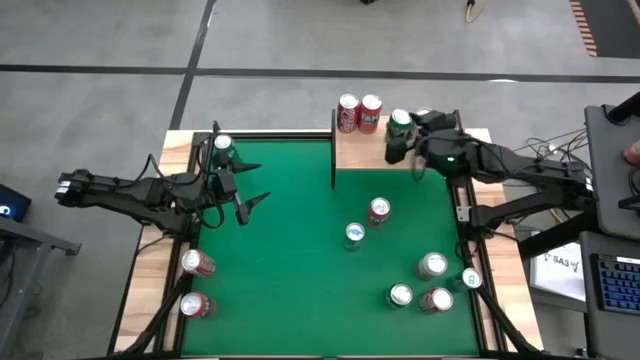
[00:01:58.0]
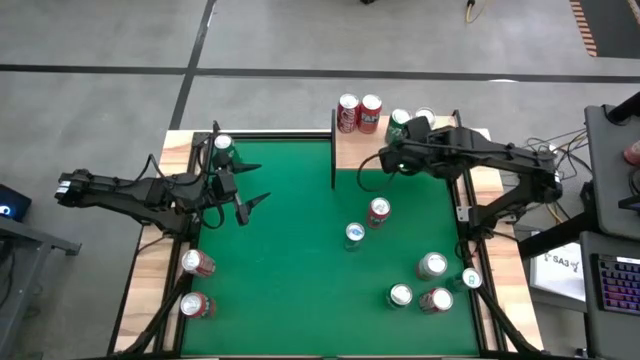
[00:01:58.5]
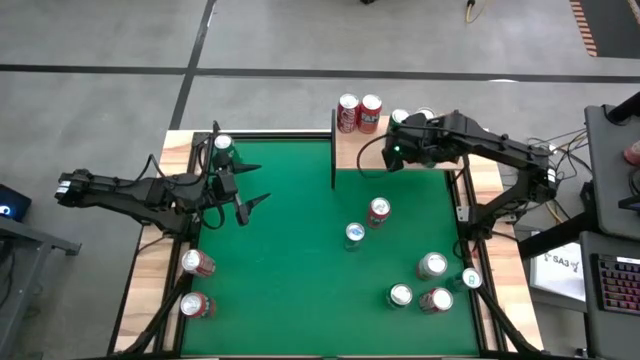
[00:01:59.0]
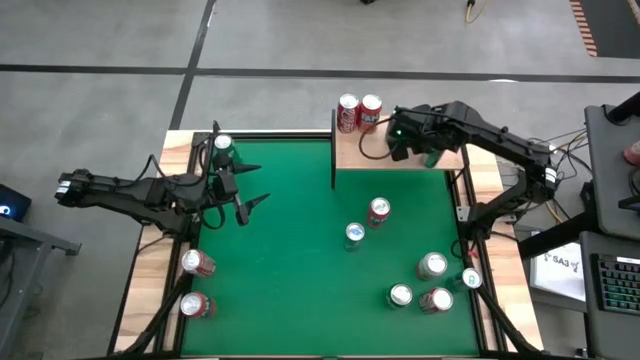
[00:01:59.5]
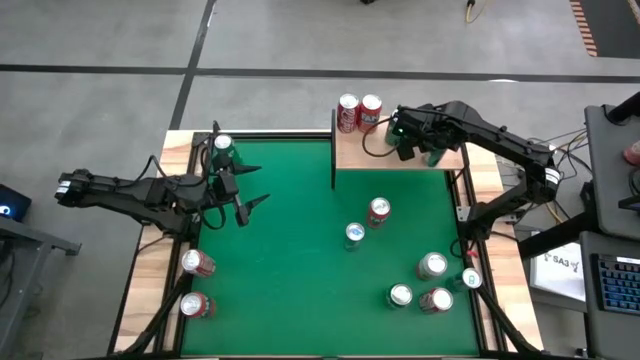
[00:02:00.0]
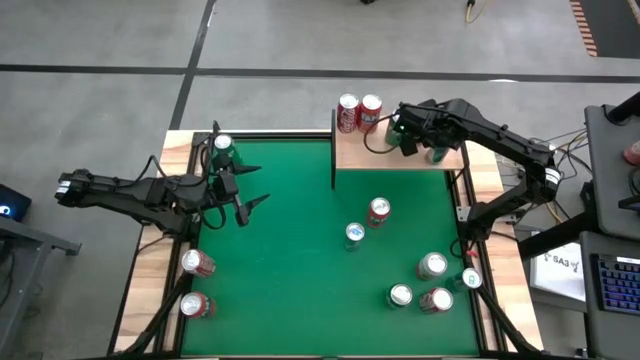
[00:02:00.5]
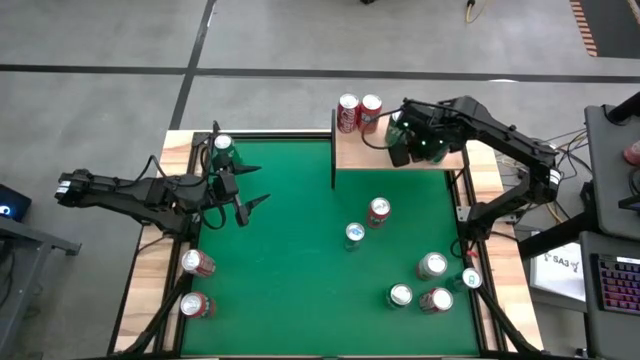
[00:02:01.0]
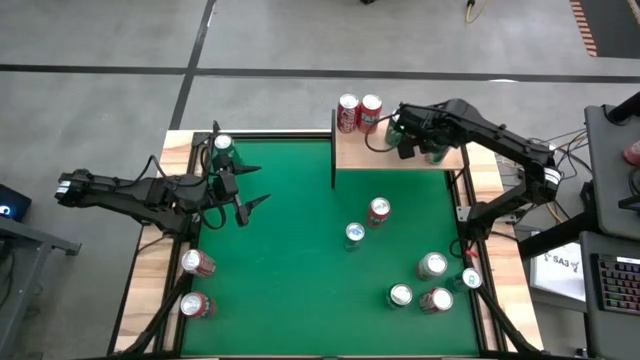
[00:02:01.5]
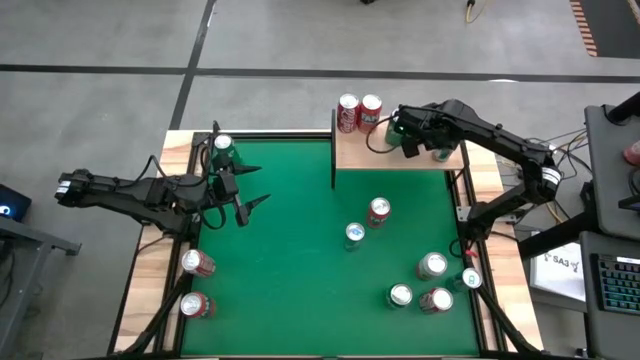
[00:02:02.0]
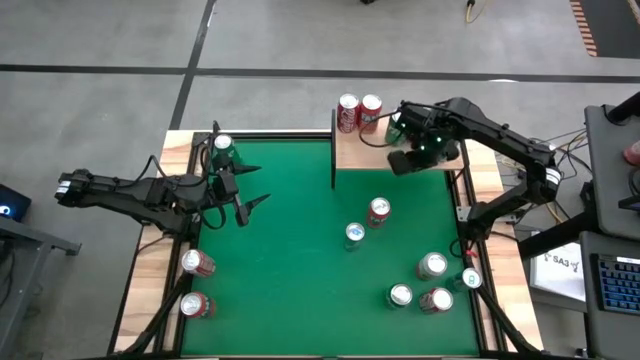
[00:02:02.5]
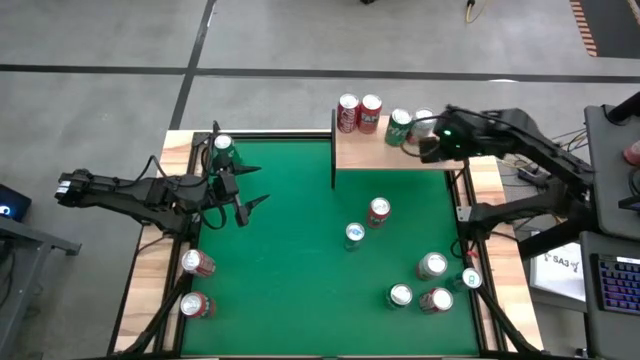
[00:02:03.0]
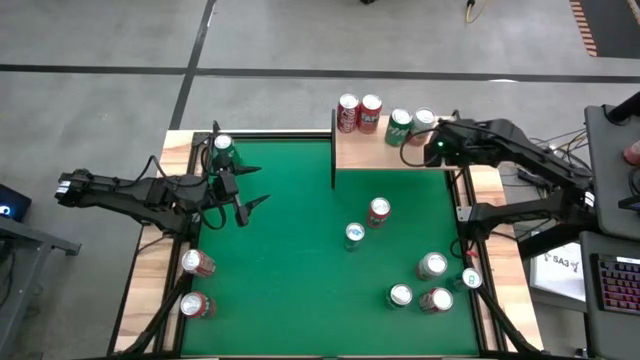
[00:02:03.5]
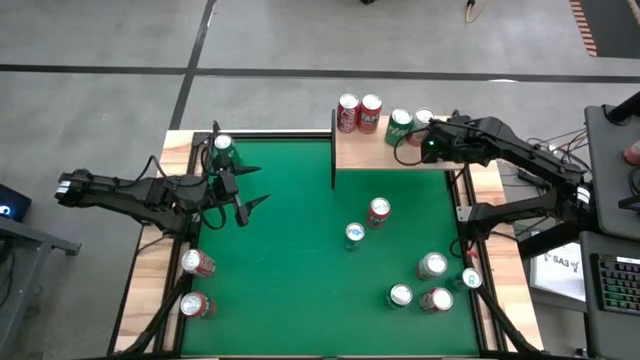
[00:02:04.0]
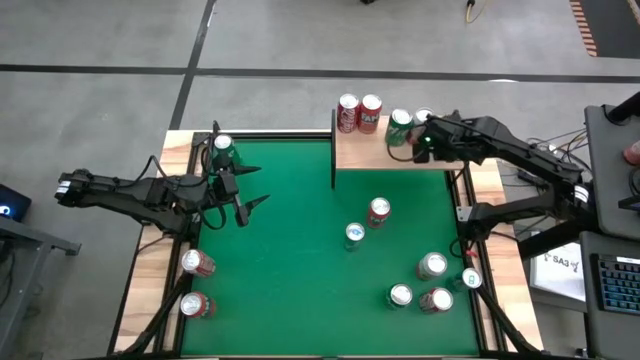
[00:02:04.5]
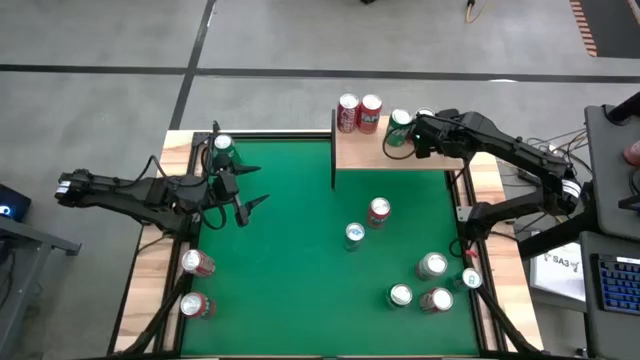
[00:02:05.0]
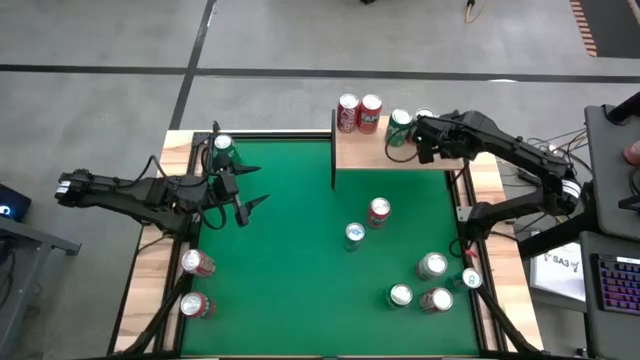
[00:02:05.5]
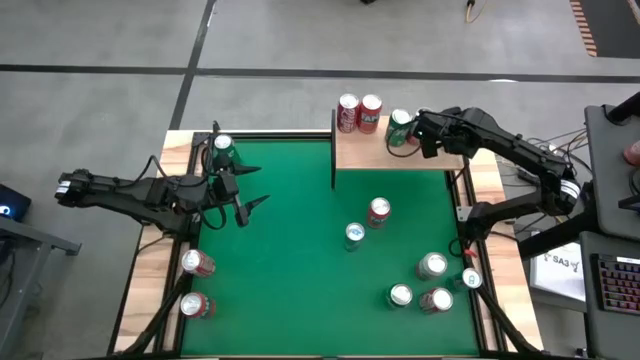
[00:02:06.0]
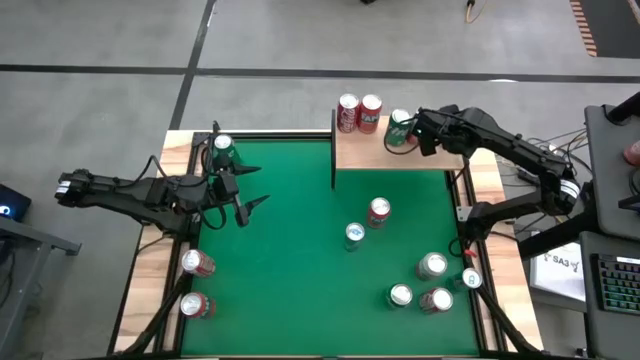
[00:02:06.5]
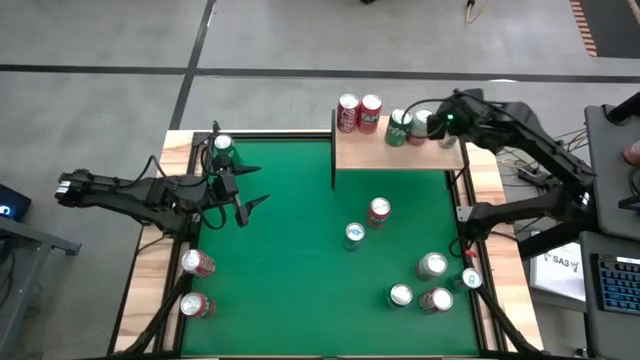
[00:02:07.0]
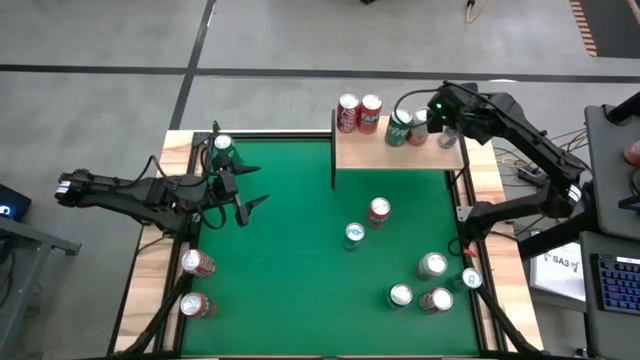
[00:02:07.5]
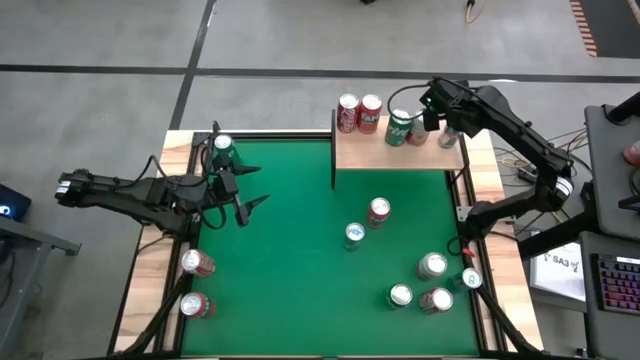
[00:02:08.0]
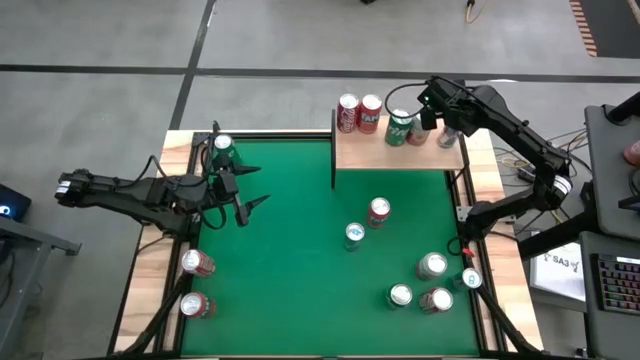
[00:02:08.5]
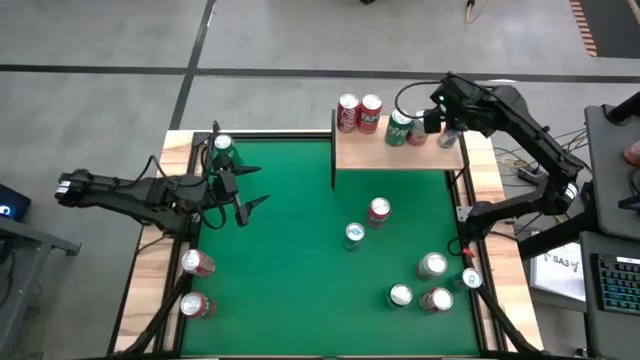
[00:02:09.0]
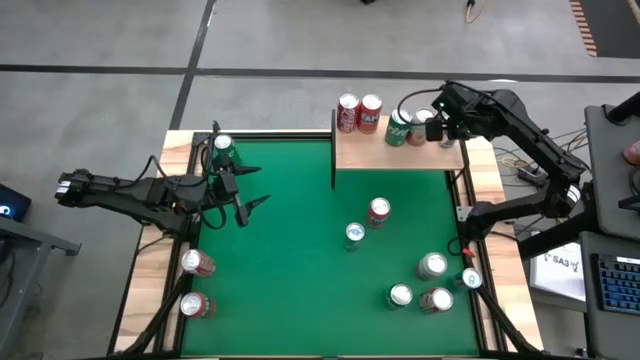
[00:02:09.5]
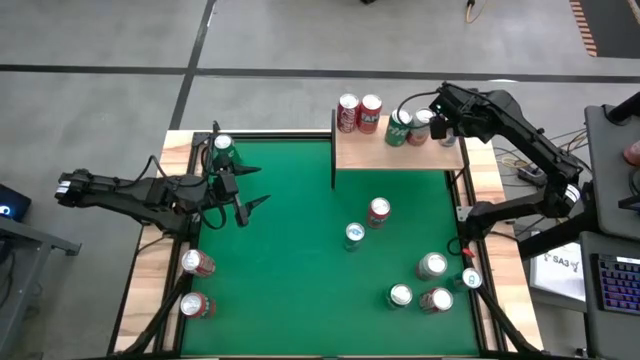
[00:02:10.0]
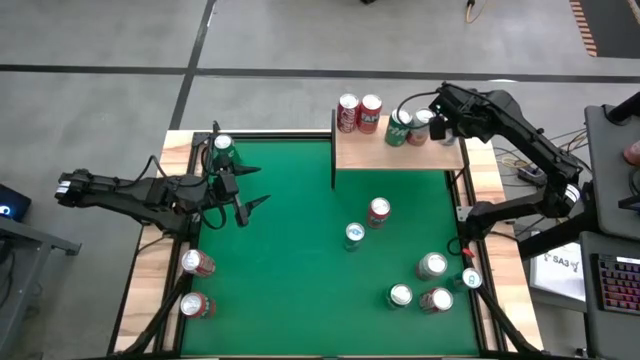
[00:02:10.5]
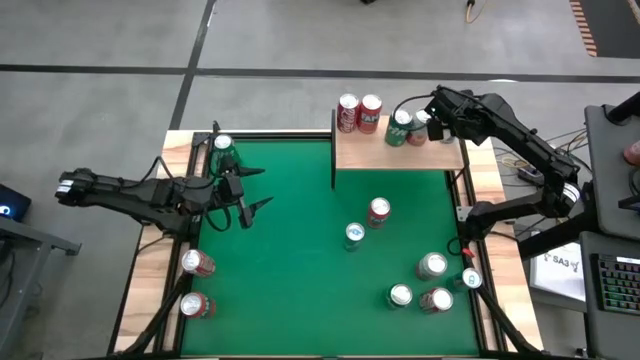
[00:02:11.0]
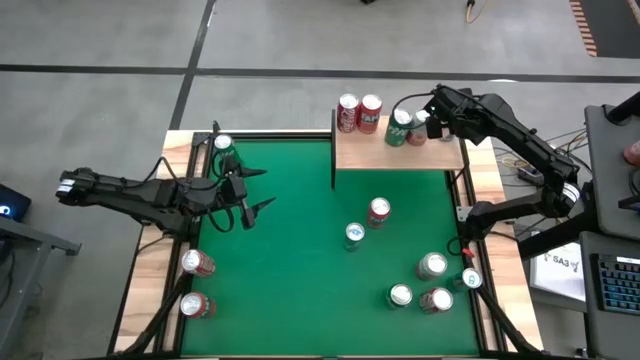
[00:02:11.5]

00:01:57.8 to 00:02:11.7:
Task: Place canned beverage on shelf
Put the top blue soda can on the shelf

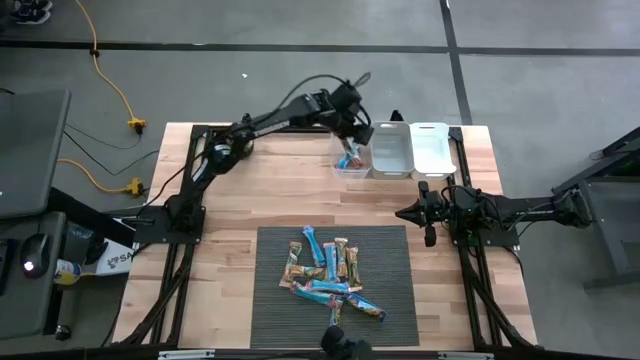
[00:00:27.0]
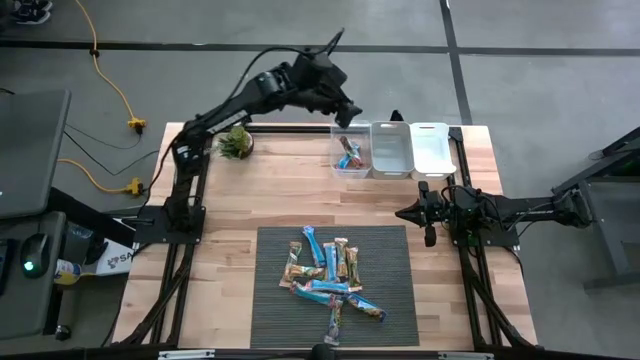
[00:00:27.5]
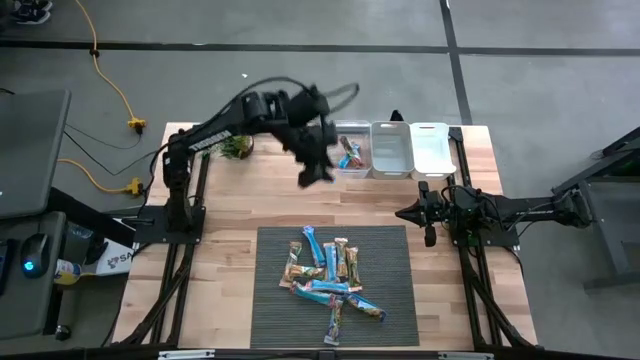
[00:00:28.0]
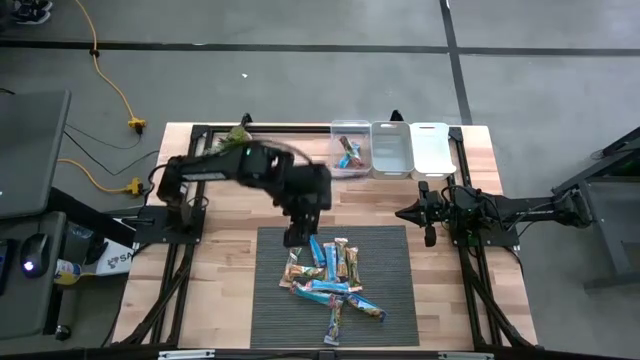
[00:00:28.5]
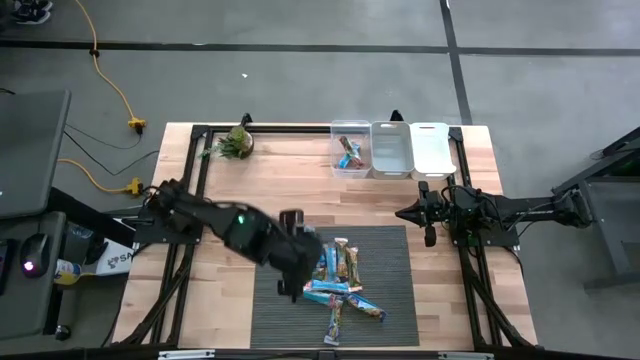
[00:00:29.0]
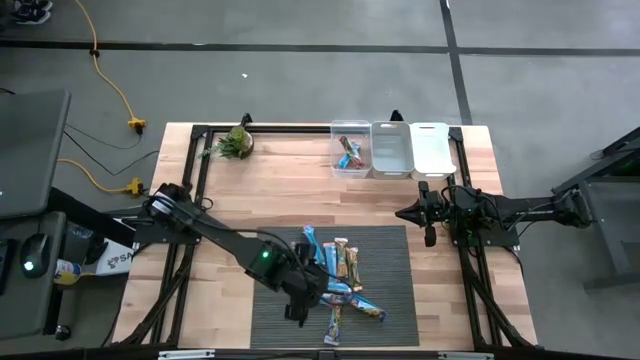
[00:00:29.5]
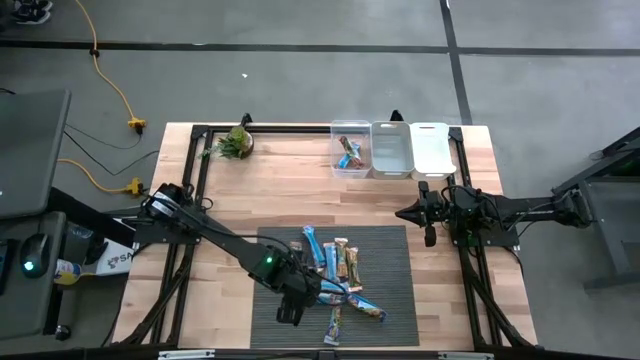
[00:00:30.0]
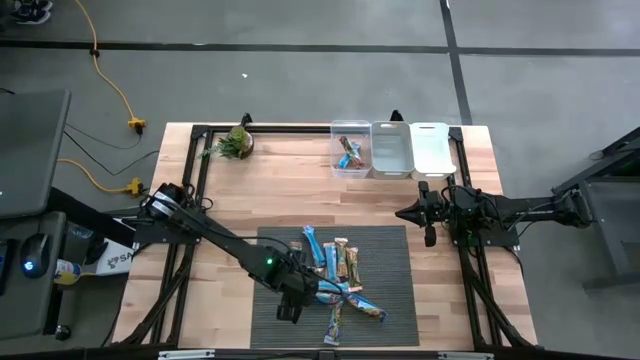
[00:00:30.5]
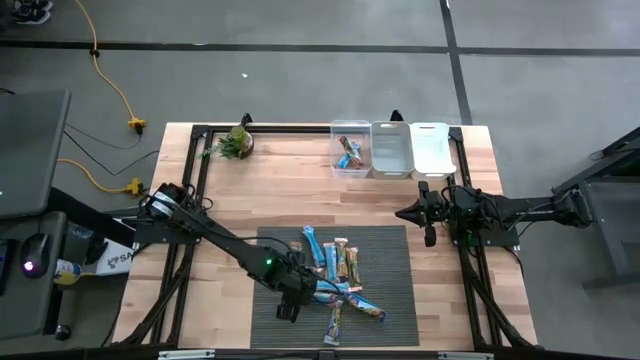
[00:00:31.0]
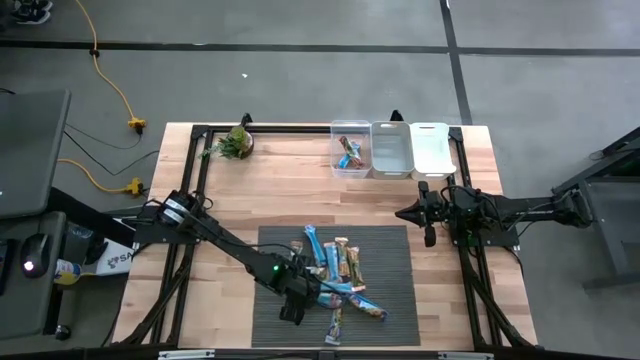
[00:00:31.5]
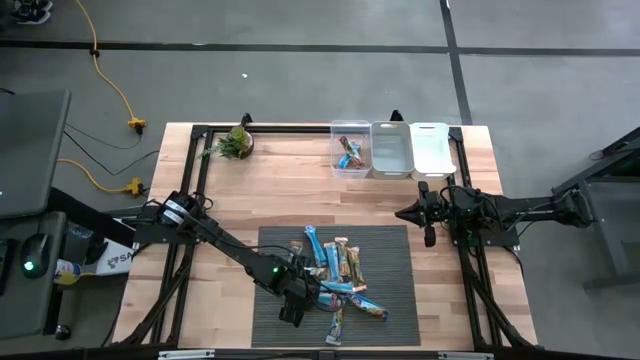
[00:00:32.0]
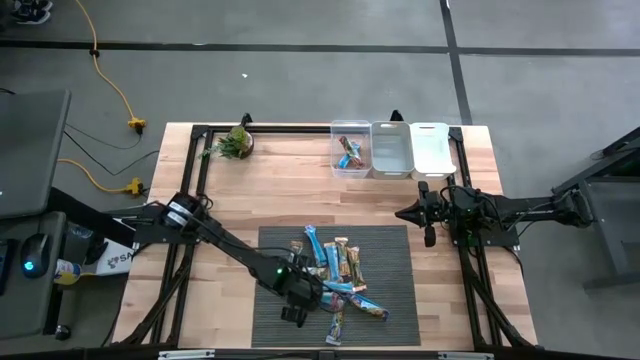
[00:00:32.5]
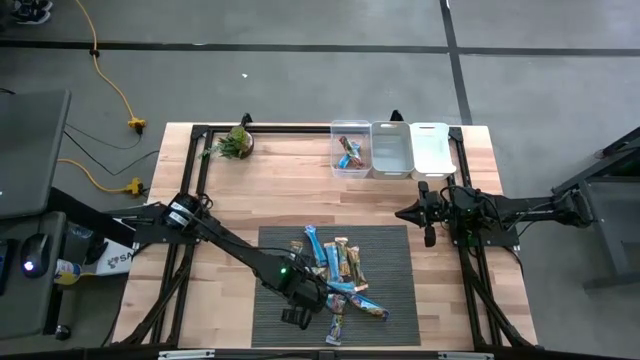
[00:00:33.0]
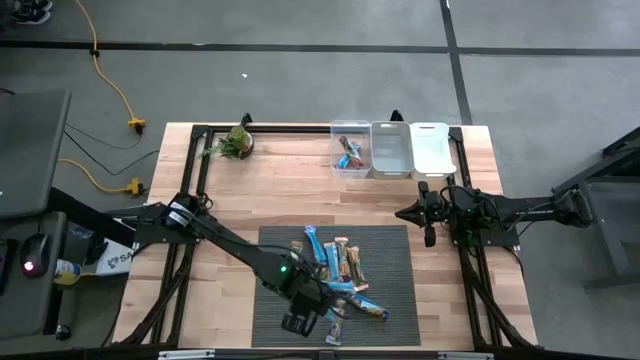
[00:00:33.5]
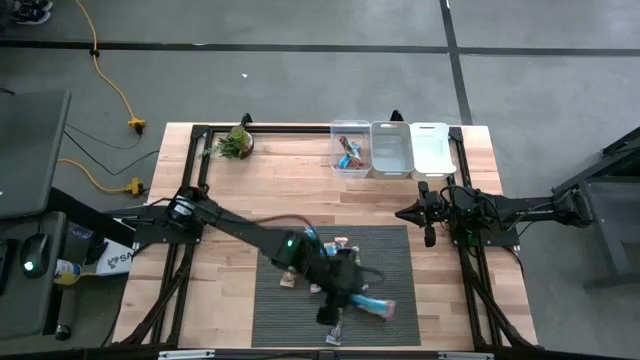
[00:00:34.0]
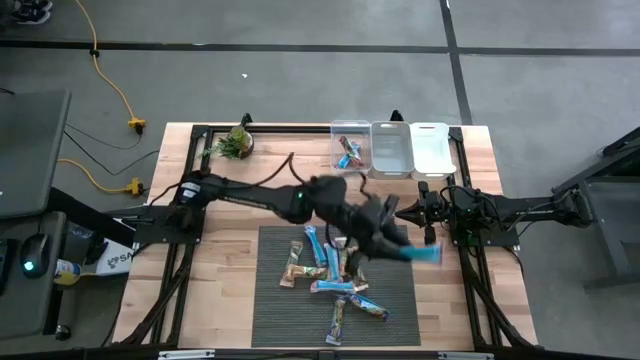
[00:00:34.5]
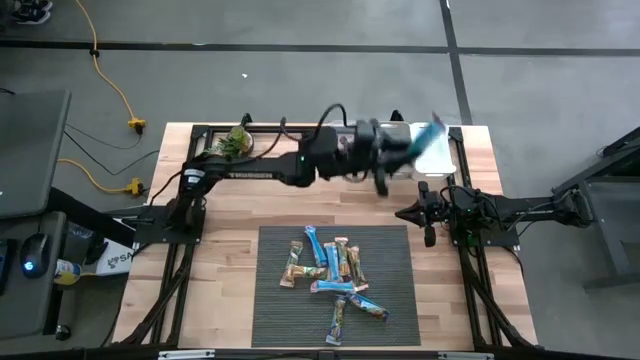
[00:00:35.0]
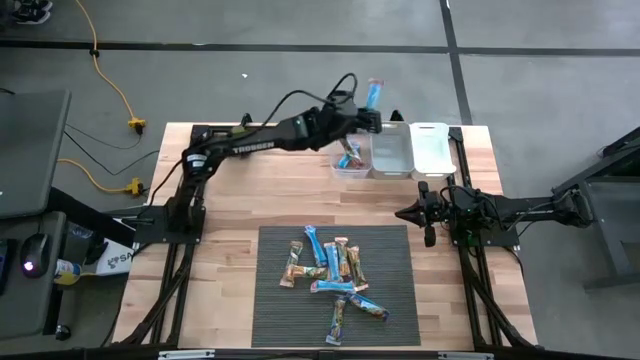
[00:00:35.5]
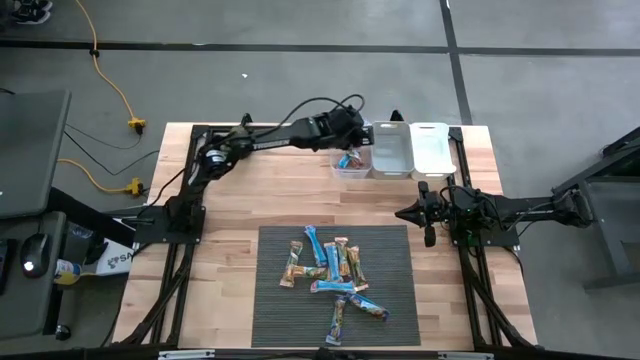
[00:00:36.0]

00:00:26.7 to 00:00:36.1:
Task: Pick and place Granola Bars by type
Put the red granola bar into the transparent bin
